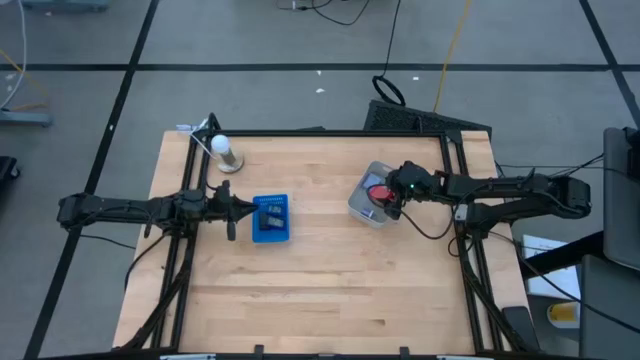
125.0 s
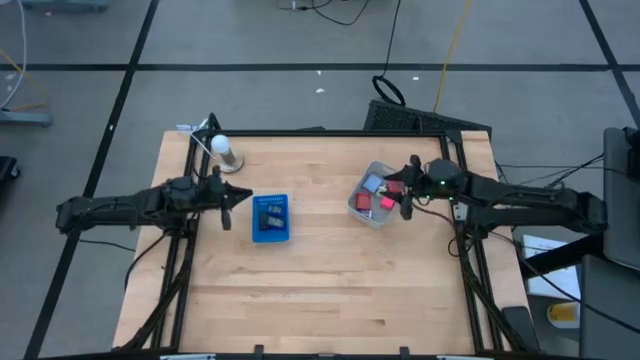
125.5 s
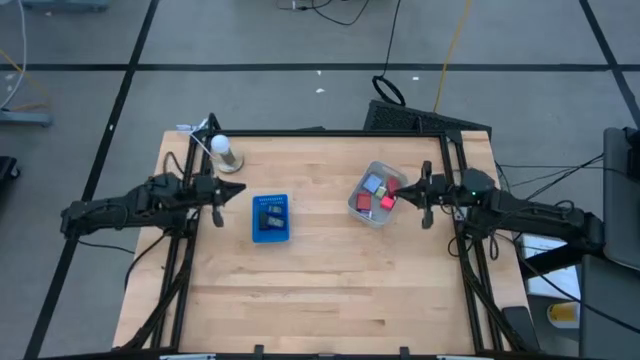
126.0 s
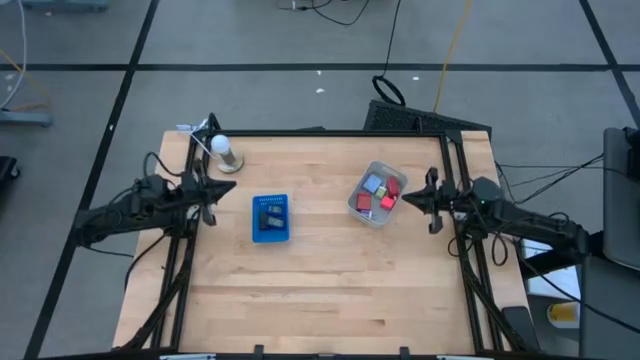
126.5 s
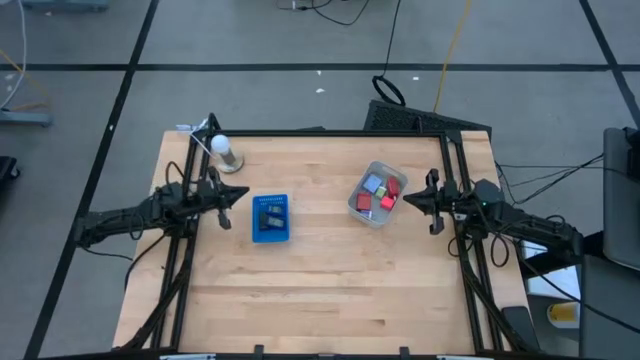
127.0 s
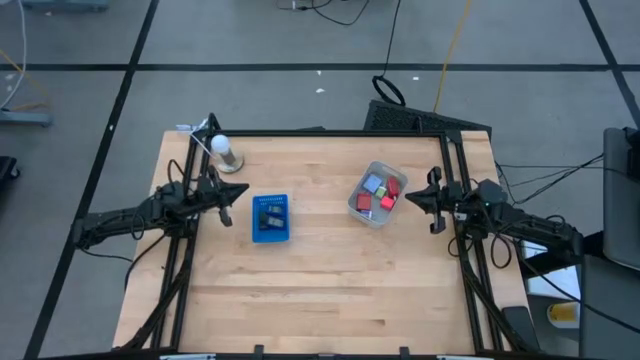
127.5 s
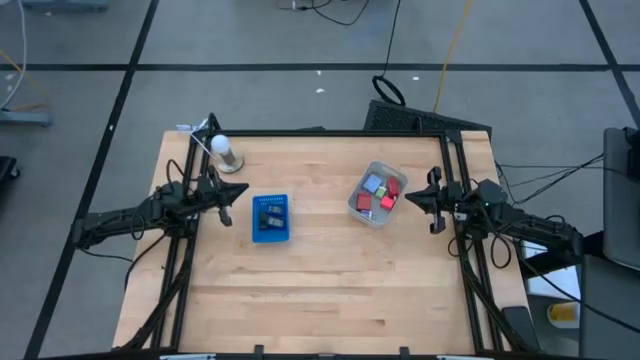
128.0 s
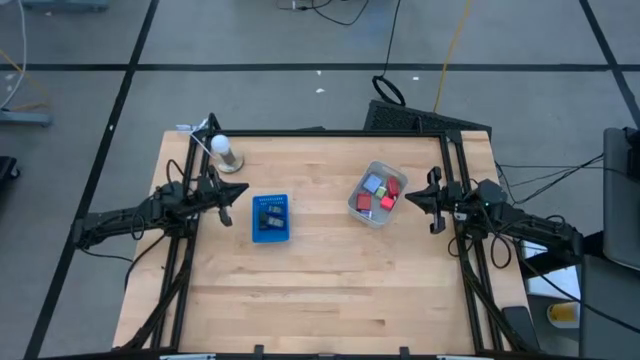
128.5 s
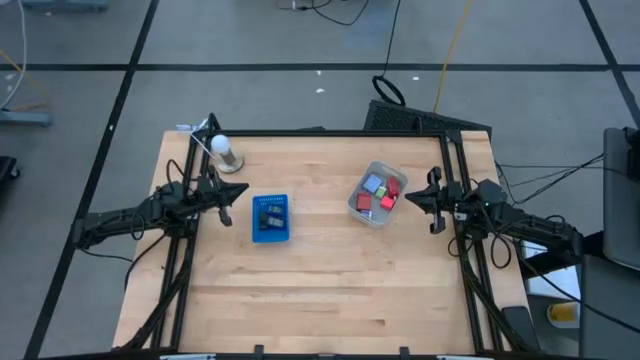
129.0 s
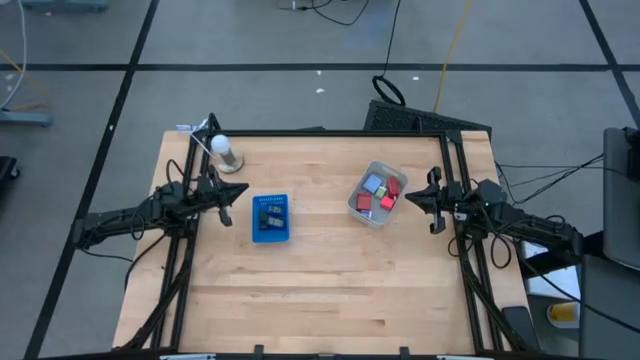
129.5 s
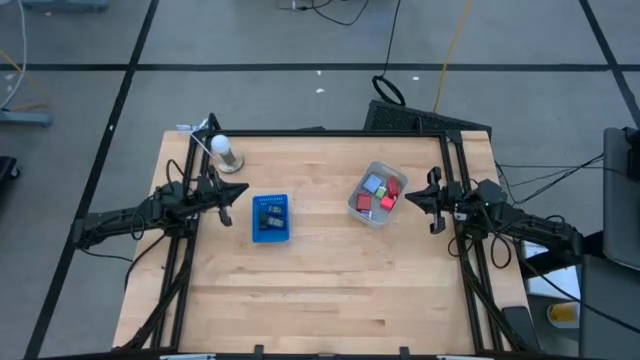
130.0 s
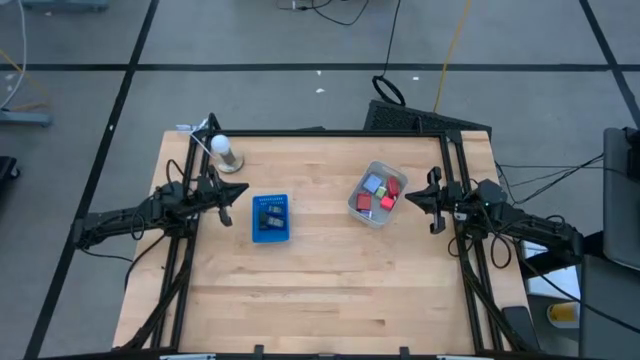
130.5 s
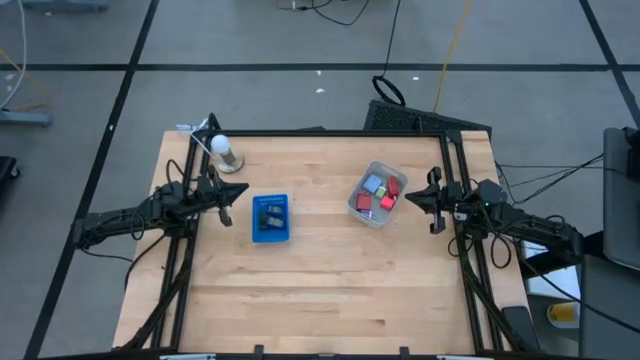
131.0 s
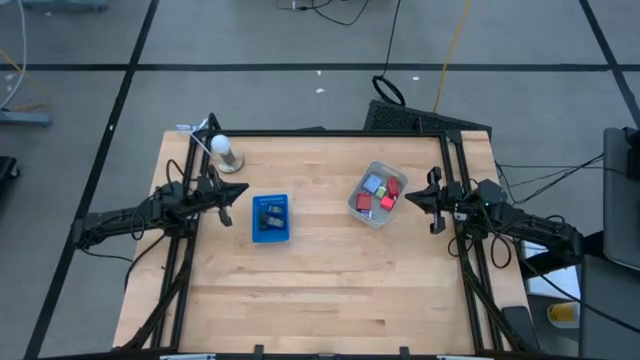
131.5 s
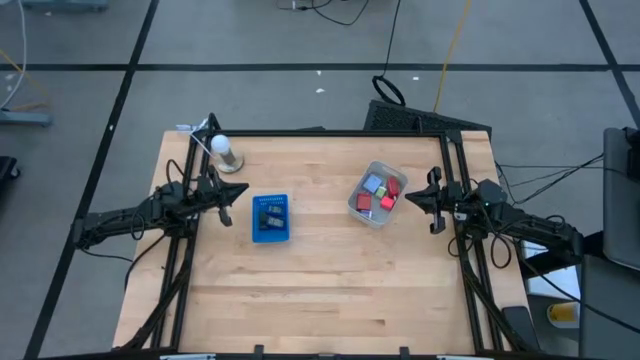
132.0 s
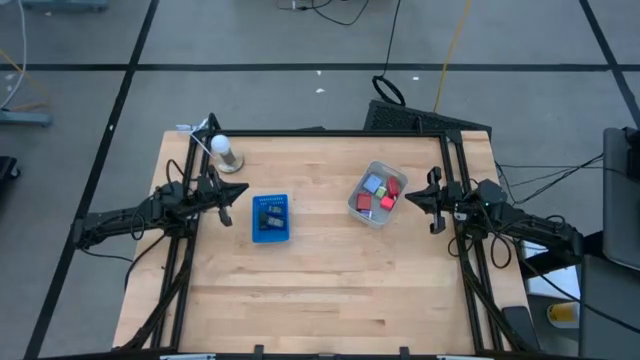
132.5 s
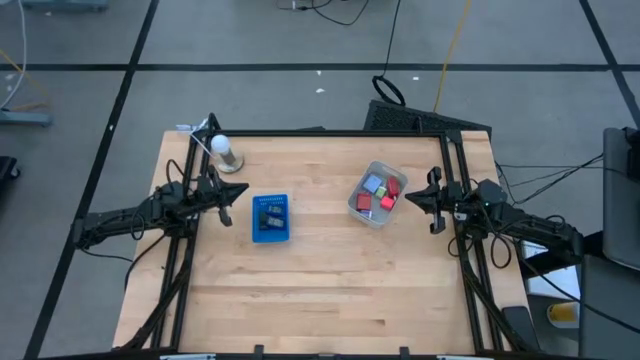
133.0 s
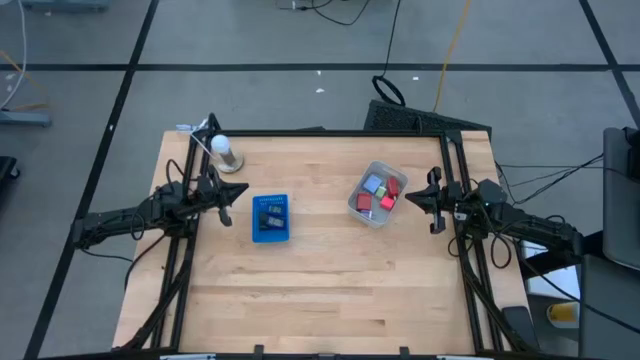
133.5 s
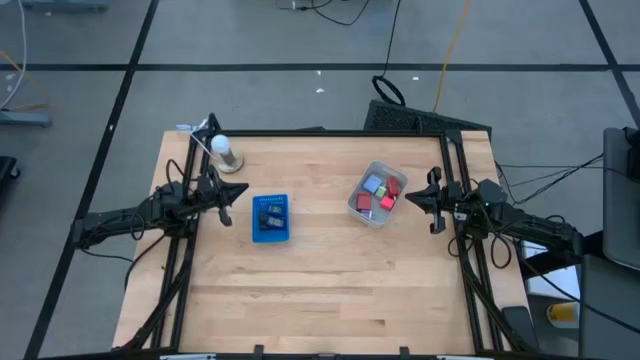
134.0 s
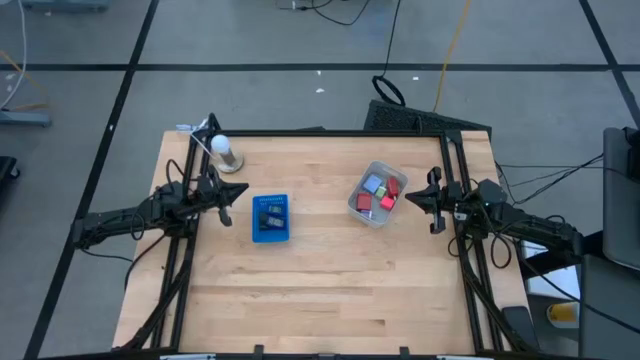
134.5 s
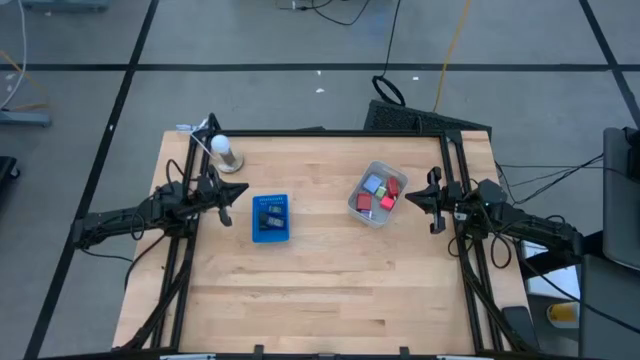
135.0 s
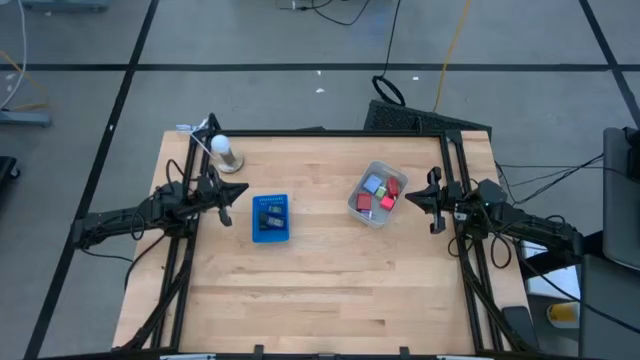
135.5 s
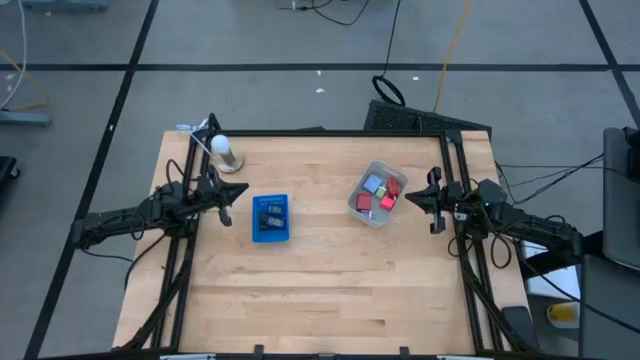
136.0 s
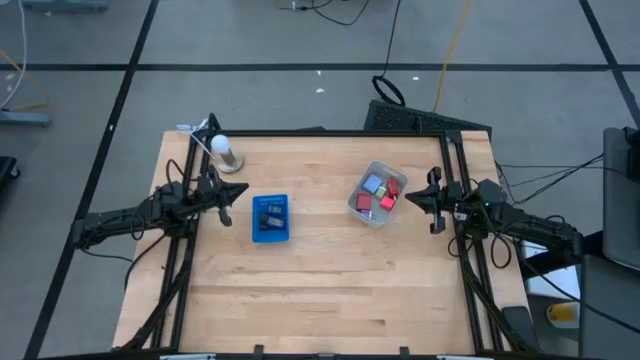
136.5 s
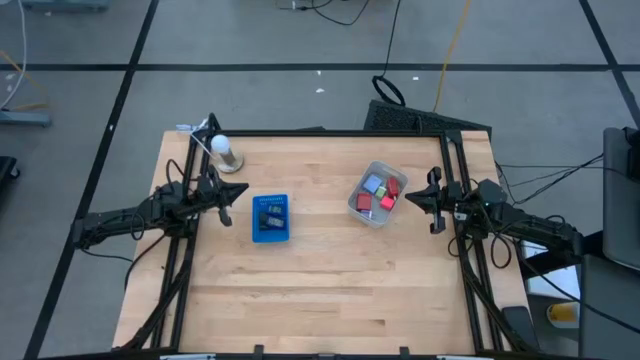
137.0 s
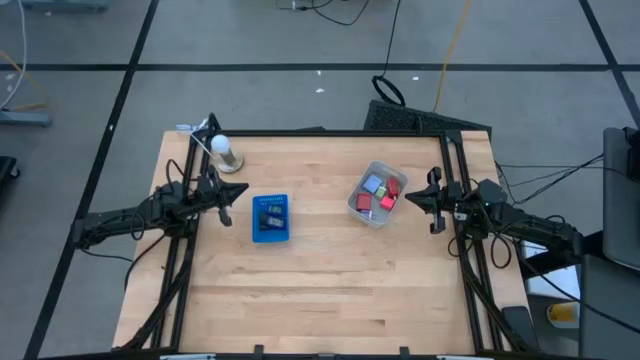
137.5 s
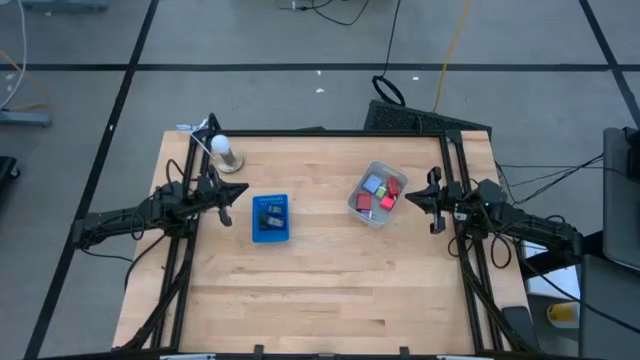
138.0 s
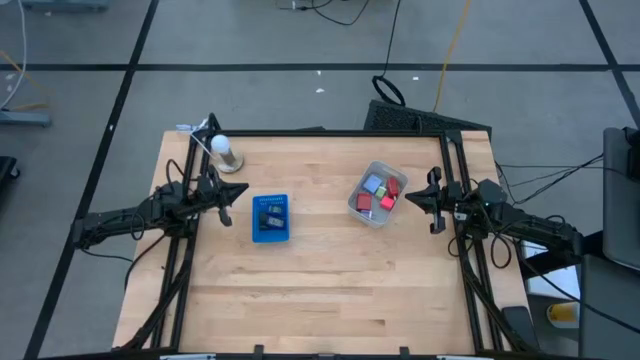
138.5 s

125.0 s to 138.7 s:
Task: Pick & Place Office items
Return to Home Position

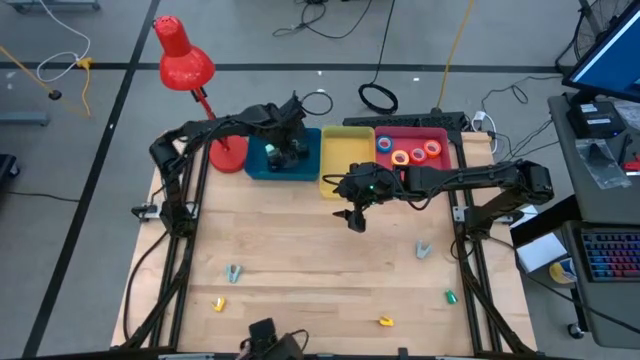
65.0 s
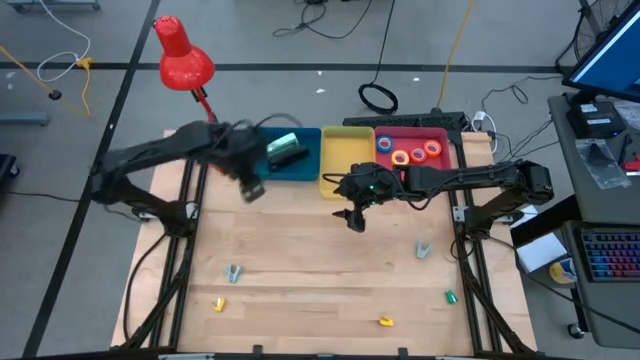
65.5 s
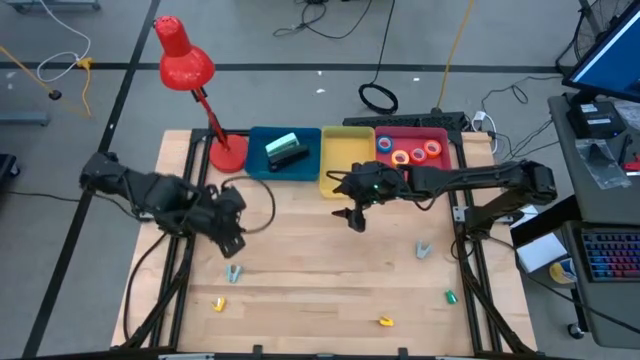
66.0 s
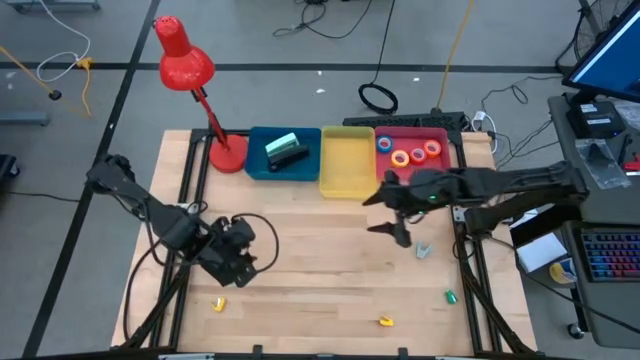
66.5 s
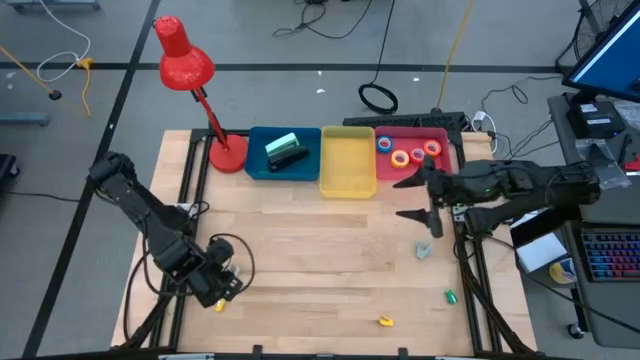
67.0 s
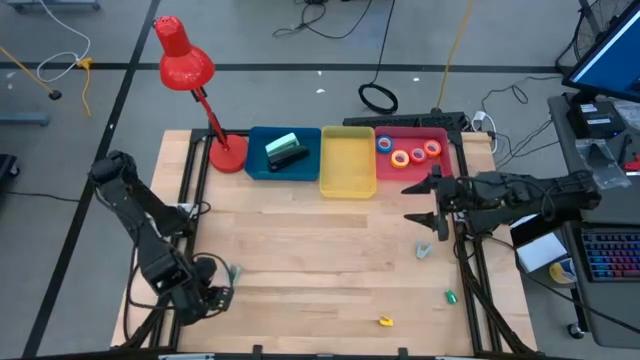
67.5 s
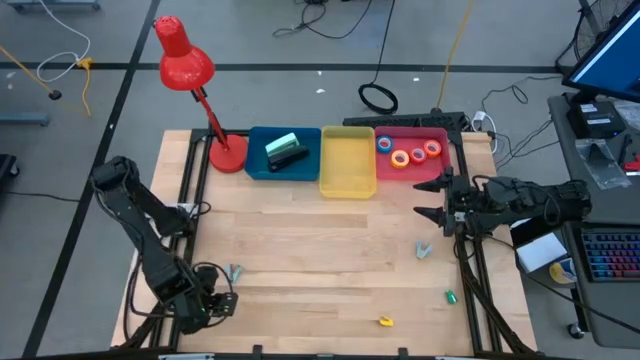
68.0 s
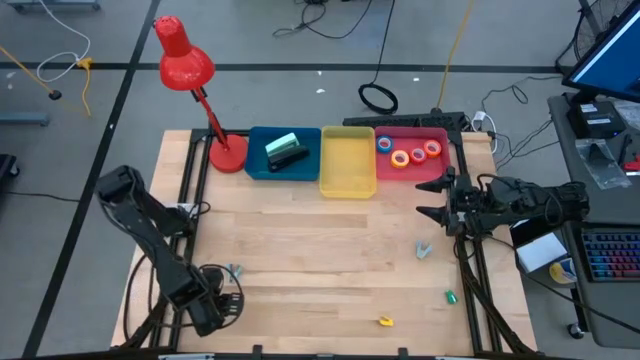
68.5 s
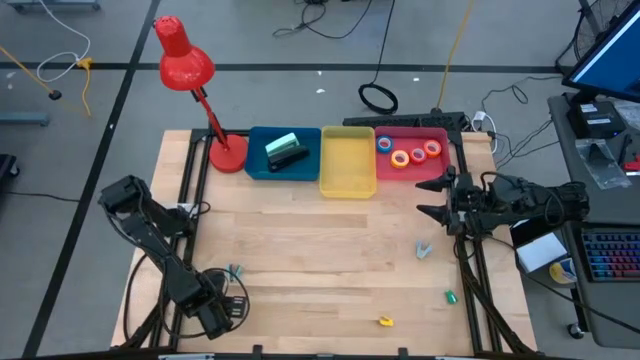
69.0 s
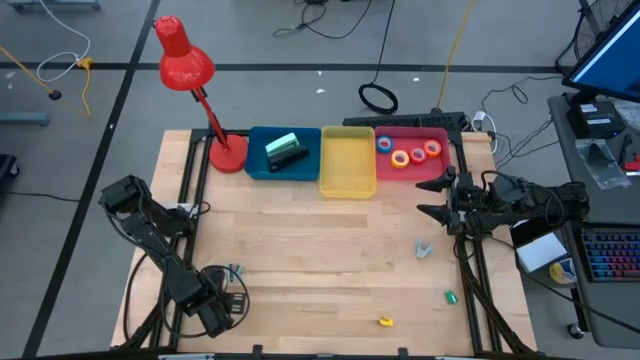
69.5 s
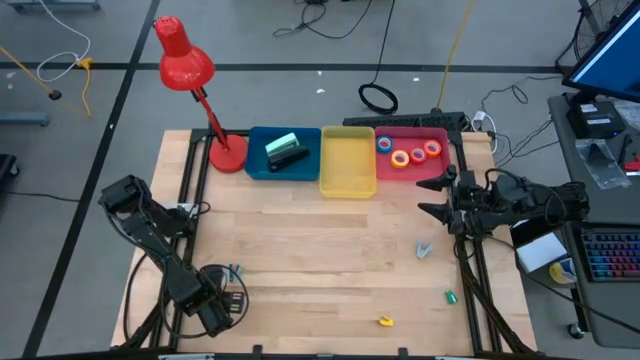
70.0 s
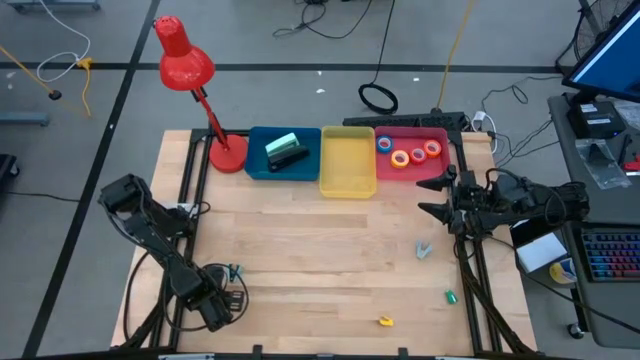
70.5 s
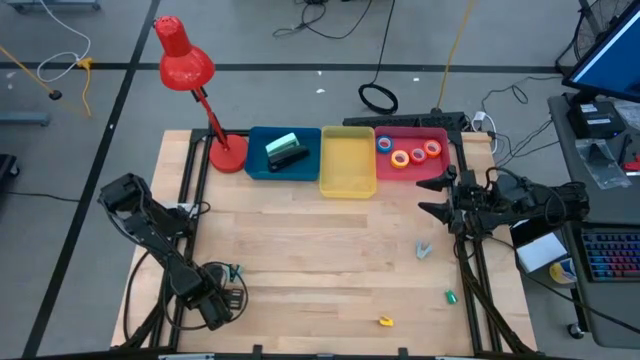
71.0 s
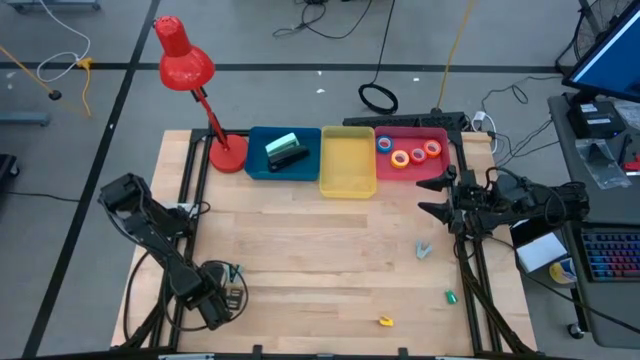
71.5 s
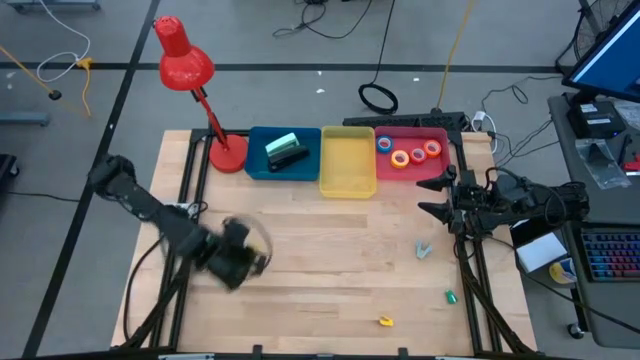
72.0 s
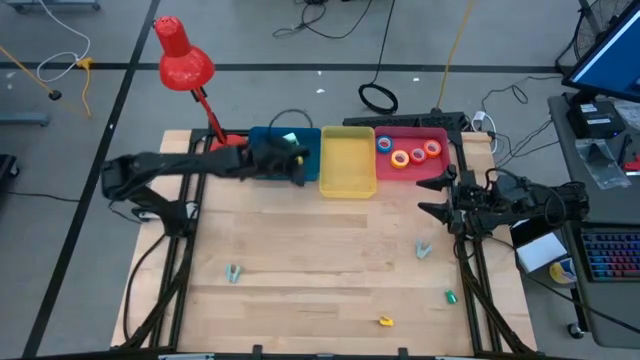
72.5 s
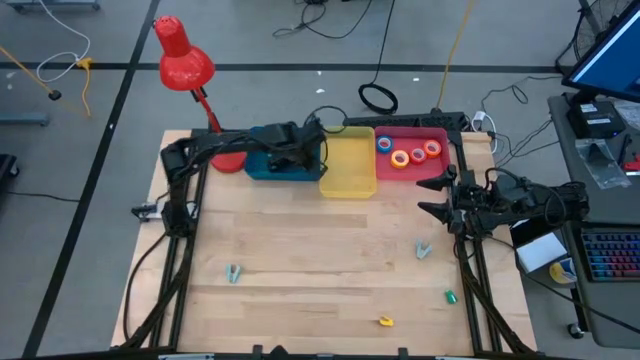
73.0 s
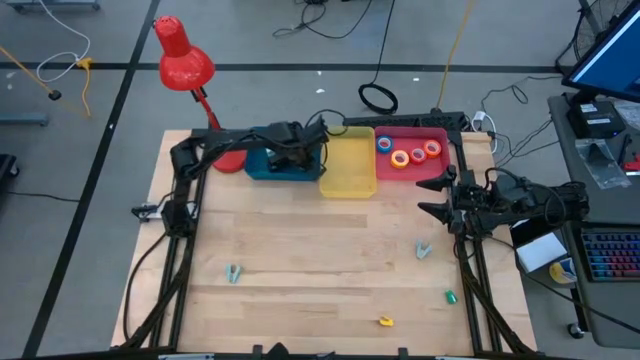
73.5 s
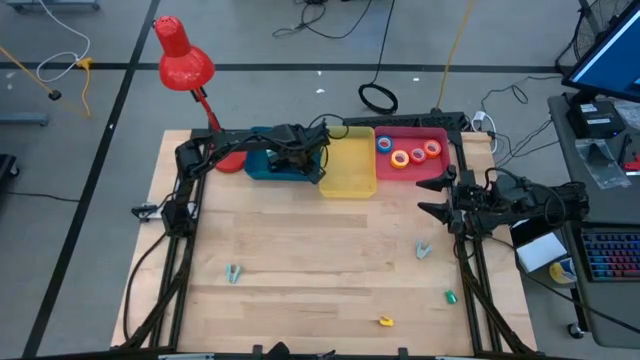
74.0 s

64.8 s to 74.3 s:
Task: Pick and place Stapler, Stapler remover, tape
Put the left small yellow stapler into the blue bin
